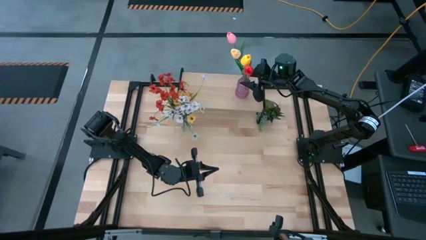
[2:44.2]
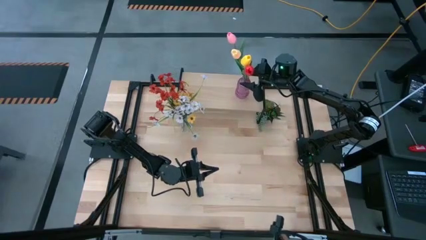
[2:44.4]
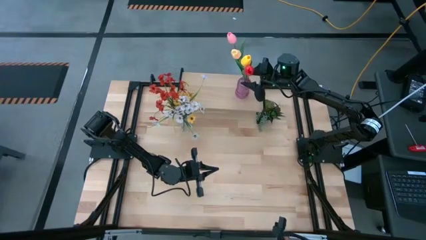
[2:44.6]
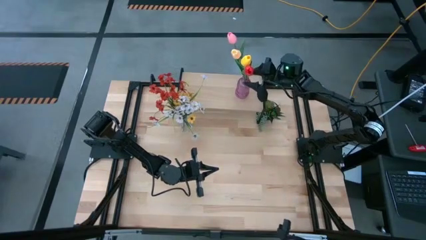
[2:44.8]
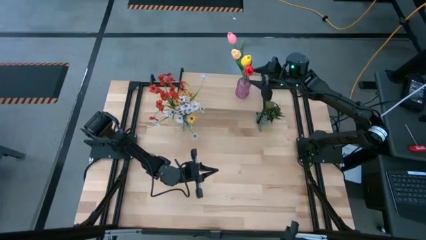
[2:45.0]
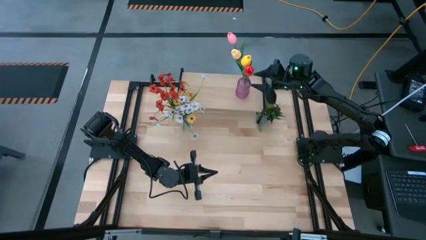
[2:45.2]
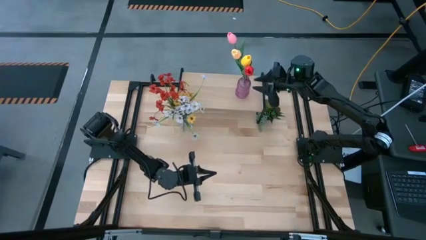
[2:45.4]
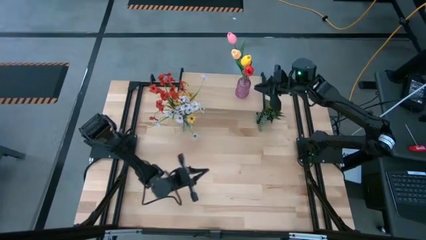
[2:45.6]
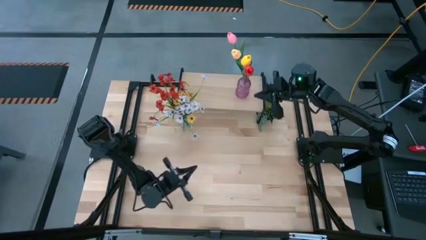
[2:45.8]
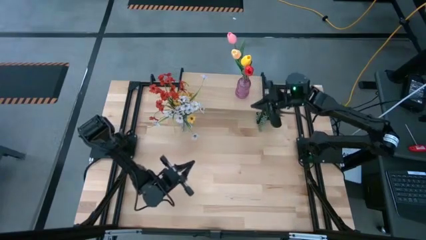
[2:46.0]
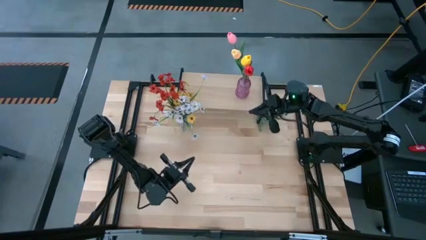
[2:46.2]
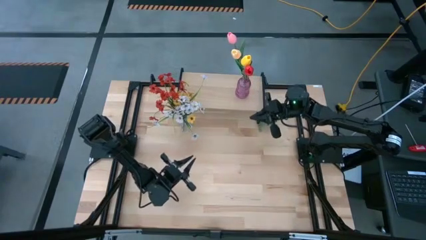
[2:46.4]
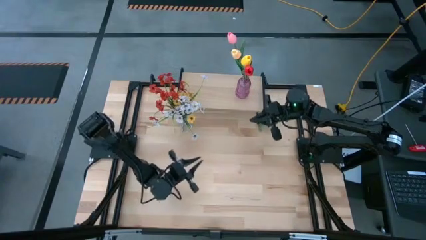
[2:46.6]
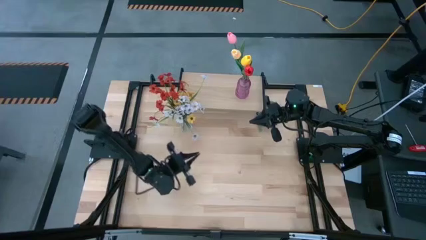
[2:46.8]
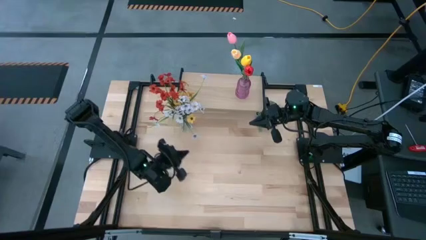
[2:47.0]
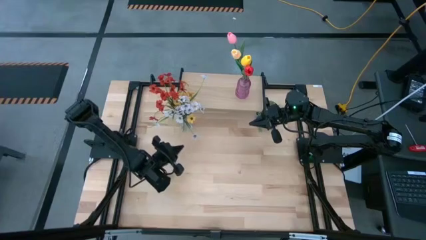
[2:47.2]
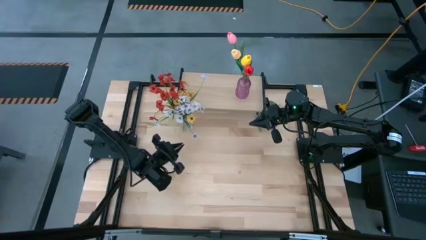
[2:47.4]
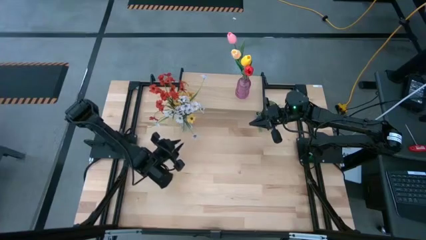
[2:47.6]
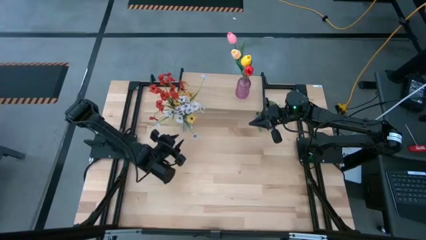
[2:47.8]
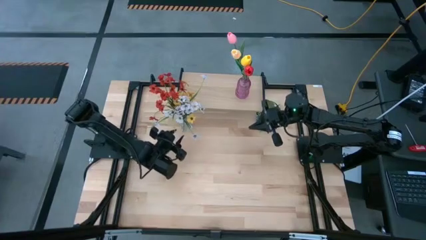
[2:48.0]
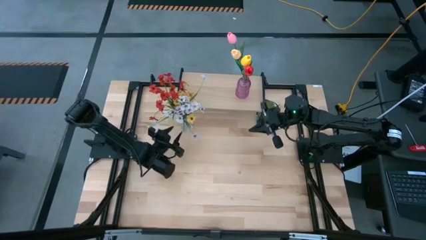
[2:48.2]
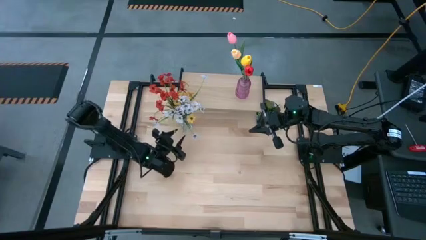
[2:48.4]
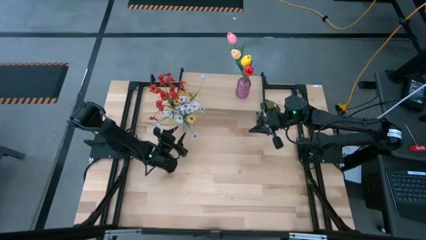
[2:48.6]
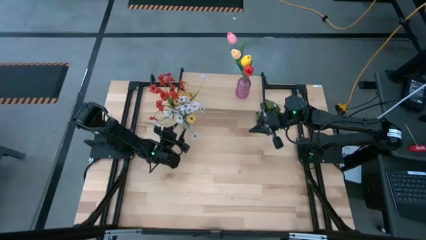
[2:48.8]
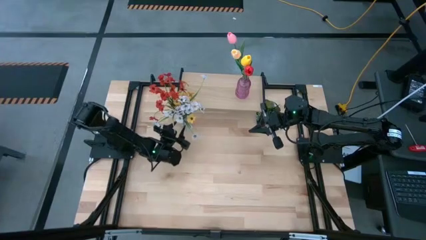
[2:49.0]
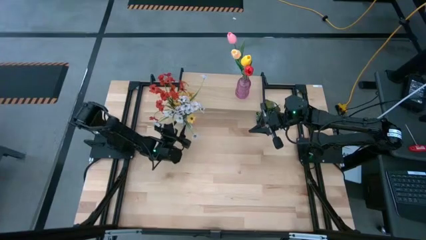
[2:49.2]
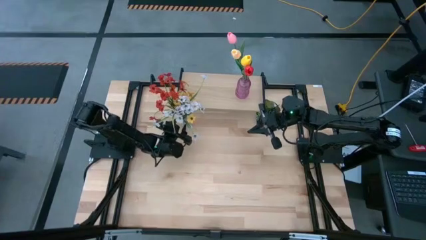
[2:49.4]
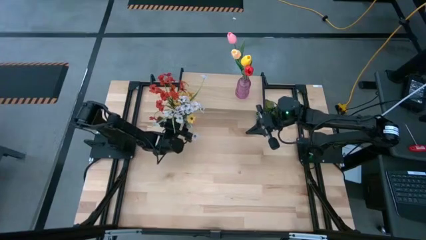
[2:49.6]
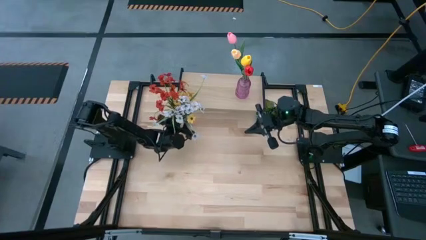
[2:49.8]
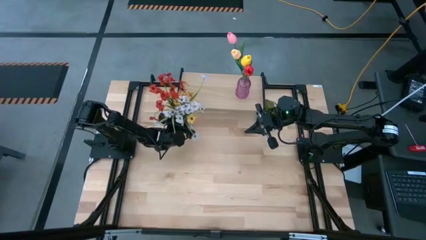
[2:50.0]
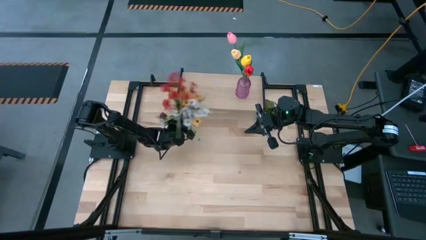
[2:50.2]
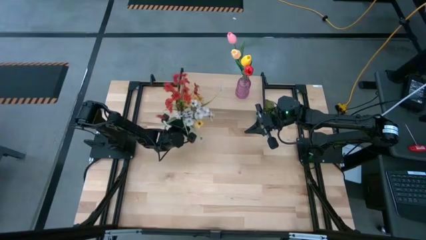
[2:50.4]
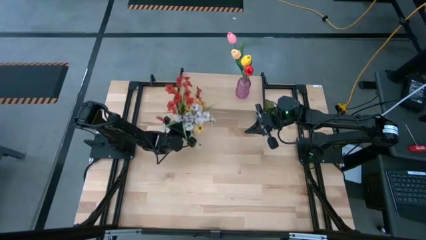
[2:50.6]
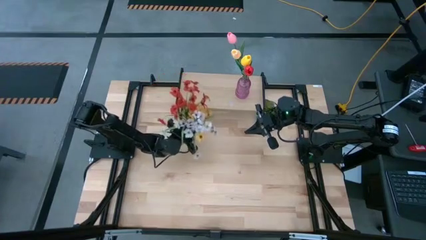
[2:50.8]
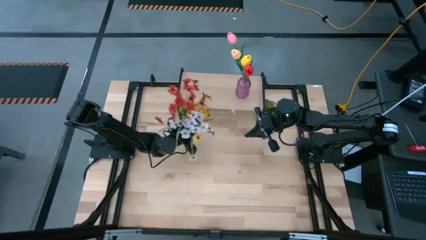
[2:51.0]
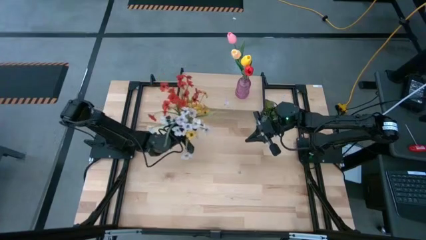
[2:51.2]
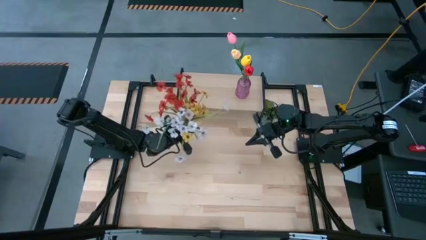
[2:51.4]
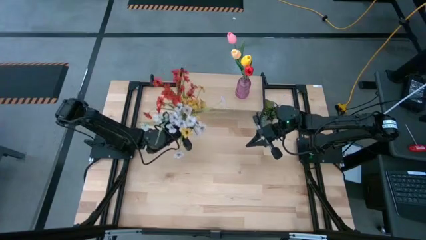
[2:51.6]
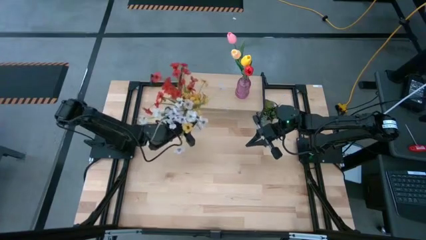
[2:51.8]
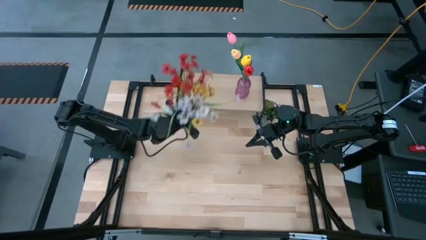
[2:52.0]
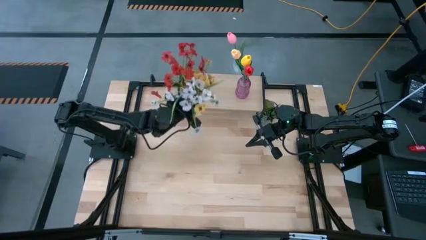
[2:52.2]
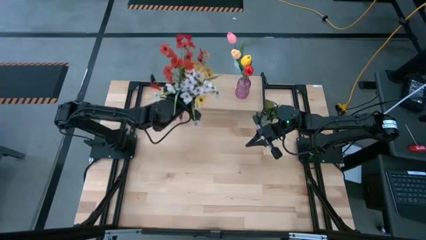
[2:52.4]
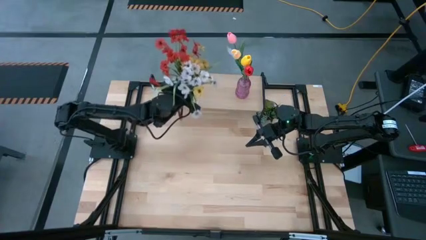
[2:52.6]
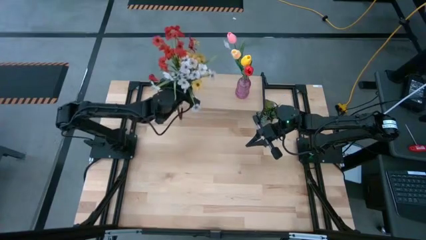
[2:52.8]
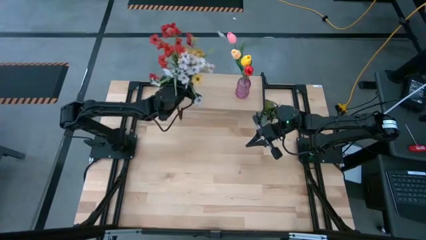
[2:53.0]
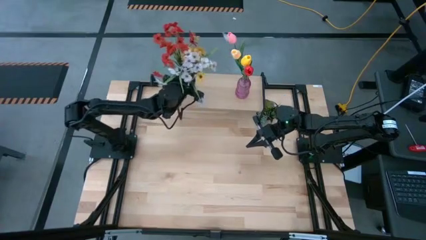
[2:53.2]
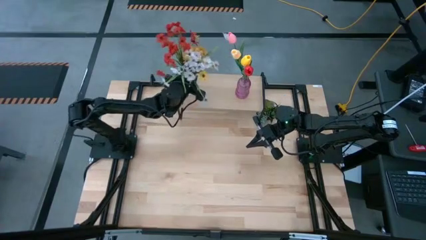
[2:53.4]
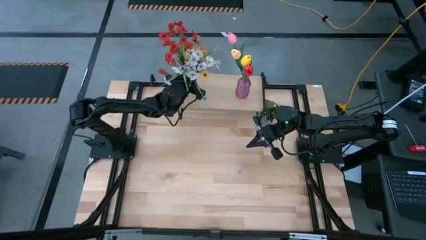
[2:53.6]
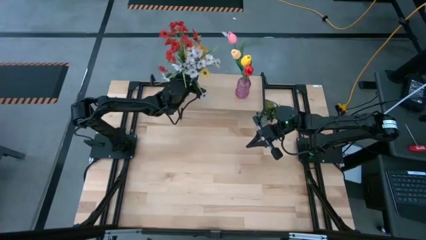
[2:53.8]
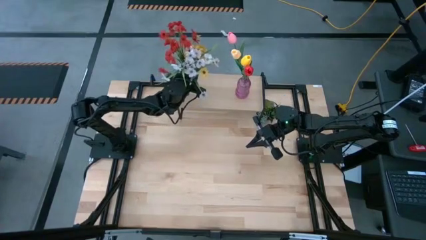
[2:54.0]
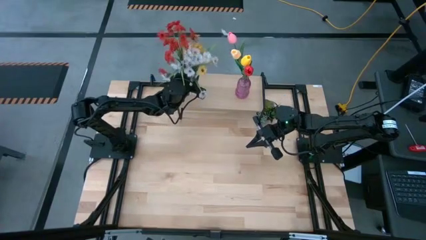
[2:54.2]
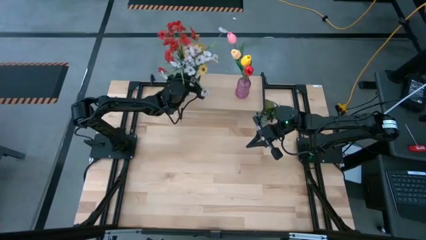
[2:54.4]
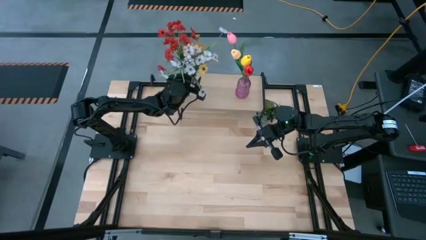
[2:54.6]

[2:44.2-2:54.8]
Task: Pick and place flowers into a vace then onto a shelf
Put the transparent vase with flowers on the shelf
